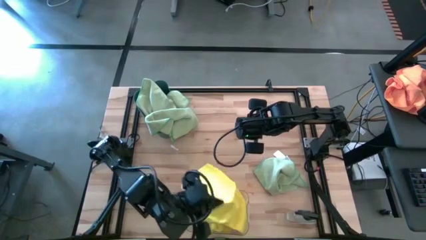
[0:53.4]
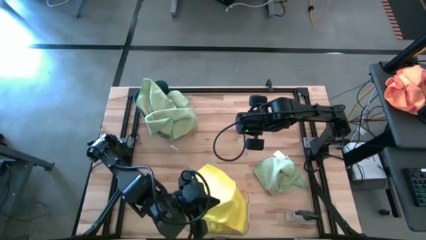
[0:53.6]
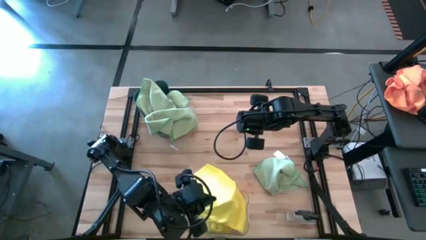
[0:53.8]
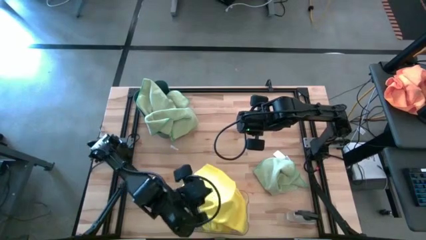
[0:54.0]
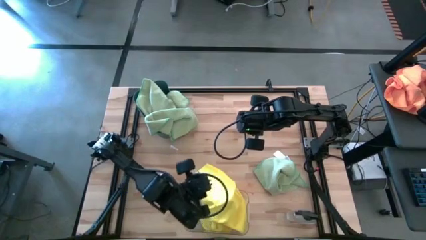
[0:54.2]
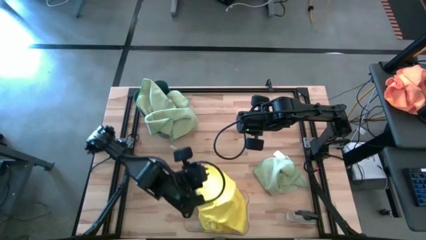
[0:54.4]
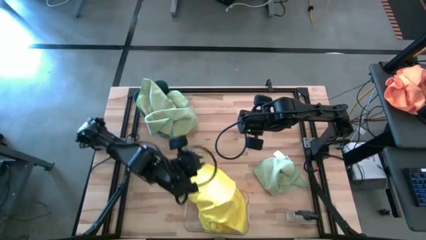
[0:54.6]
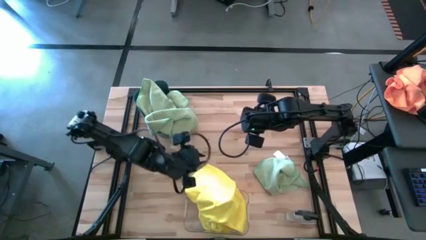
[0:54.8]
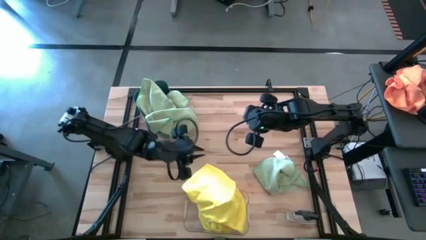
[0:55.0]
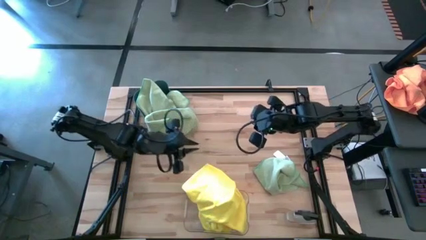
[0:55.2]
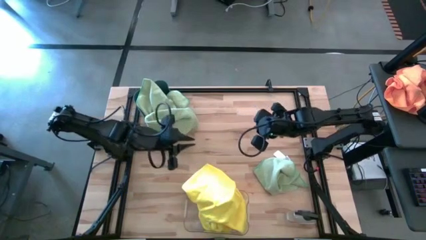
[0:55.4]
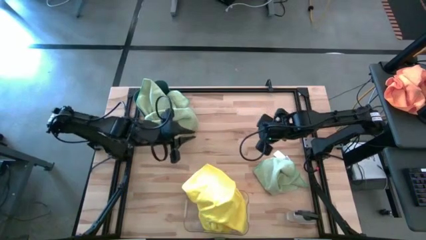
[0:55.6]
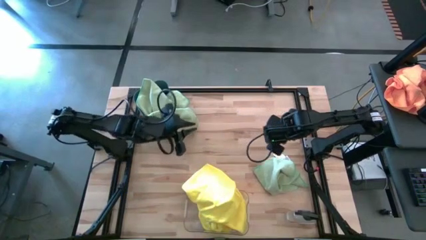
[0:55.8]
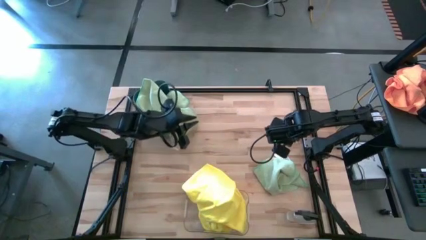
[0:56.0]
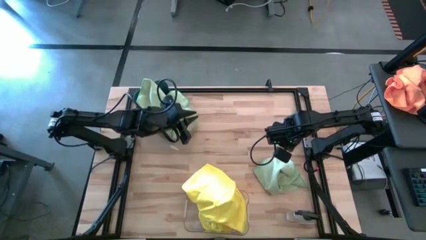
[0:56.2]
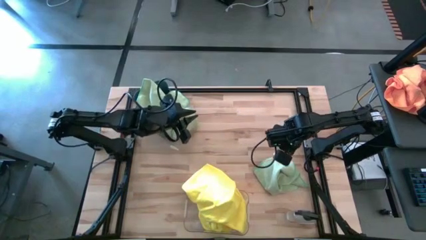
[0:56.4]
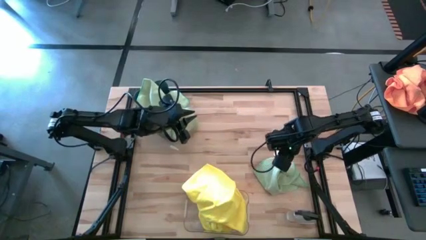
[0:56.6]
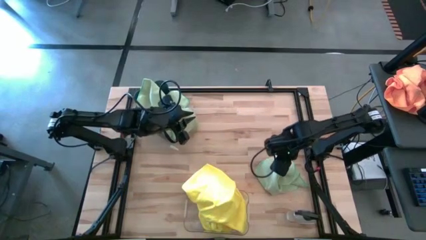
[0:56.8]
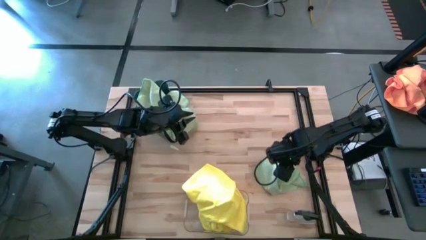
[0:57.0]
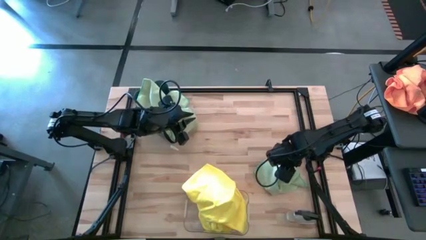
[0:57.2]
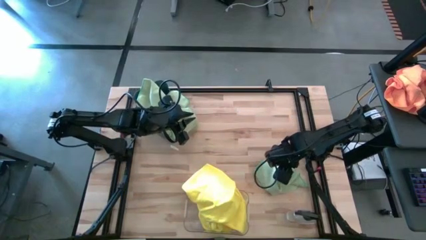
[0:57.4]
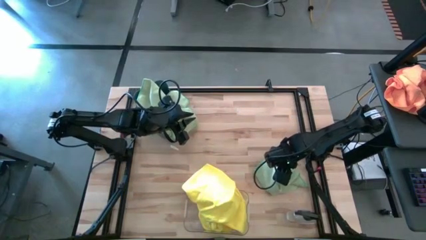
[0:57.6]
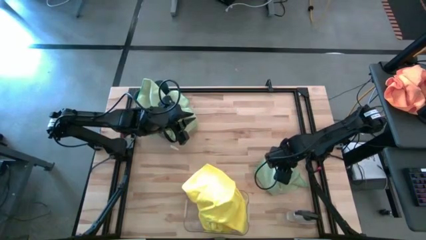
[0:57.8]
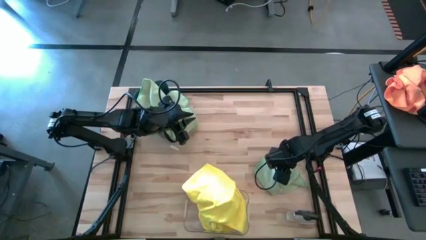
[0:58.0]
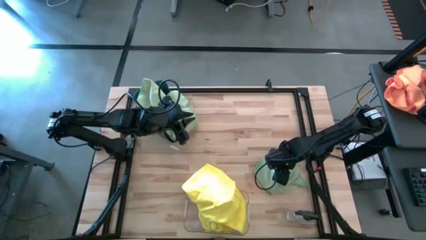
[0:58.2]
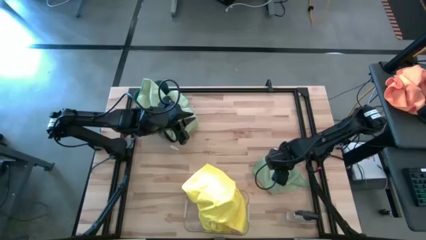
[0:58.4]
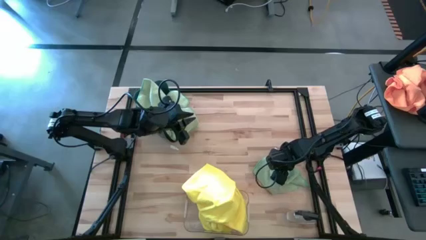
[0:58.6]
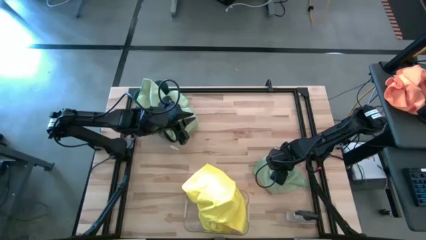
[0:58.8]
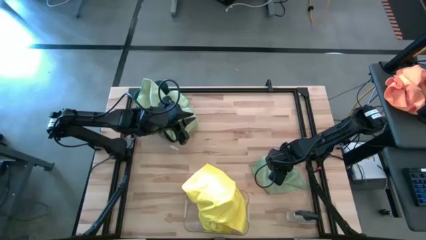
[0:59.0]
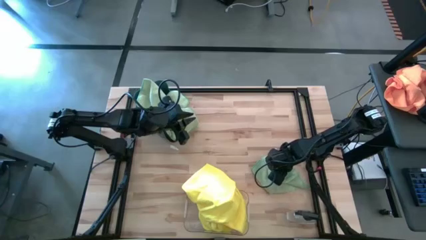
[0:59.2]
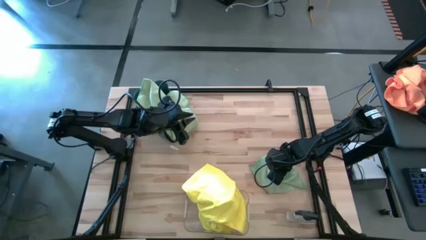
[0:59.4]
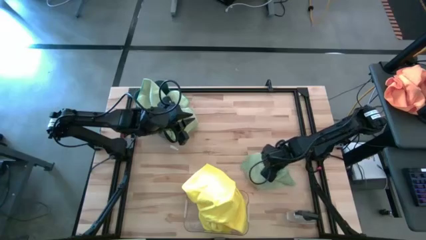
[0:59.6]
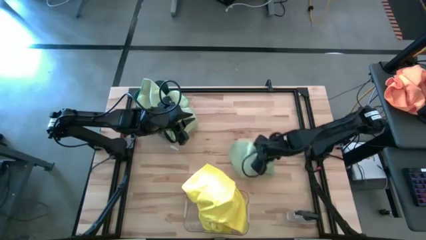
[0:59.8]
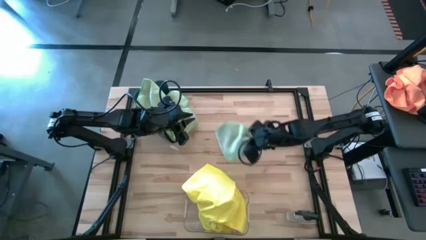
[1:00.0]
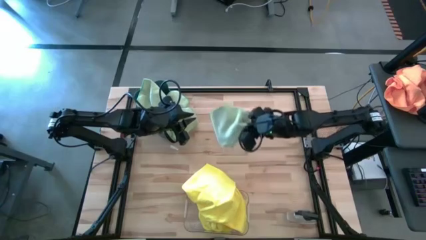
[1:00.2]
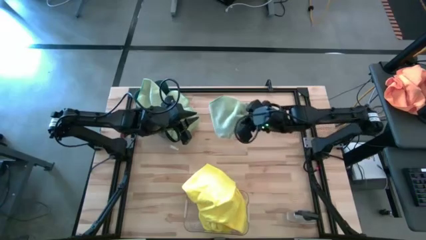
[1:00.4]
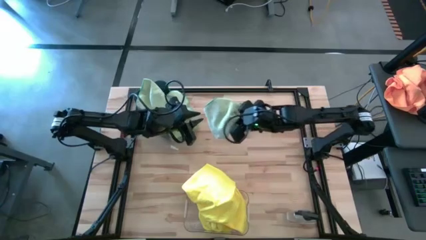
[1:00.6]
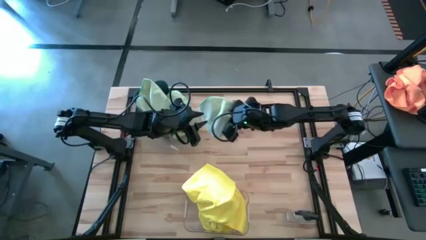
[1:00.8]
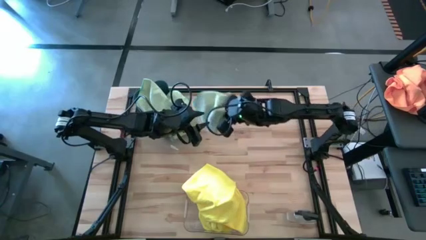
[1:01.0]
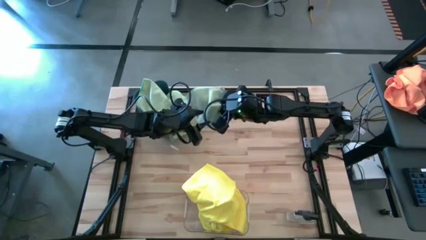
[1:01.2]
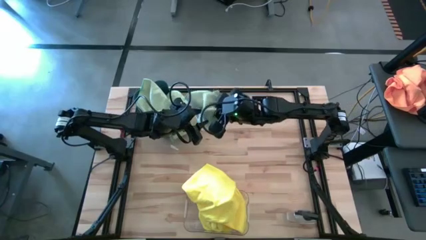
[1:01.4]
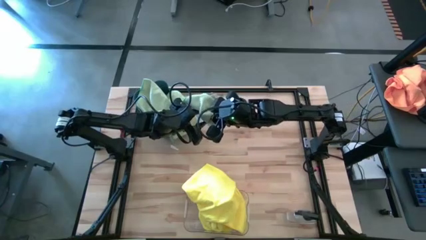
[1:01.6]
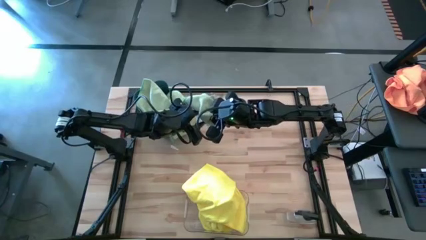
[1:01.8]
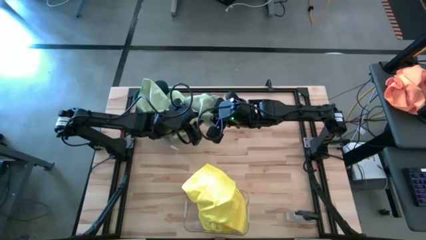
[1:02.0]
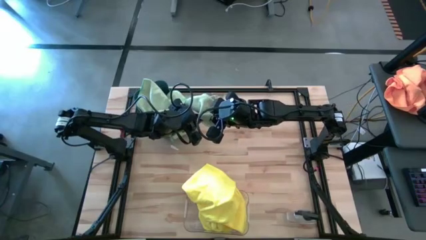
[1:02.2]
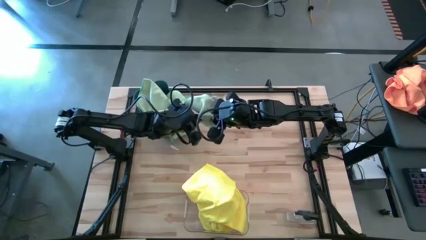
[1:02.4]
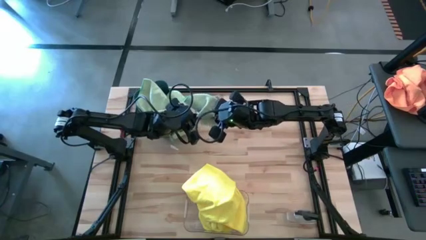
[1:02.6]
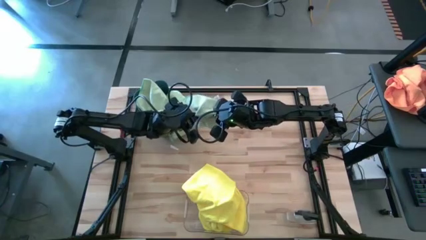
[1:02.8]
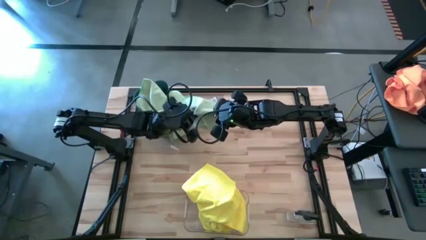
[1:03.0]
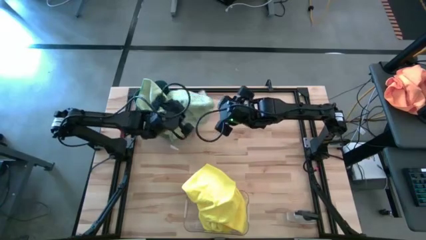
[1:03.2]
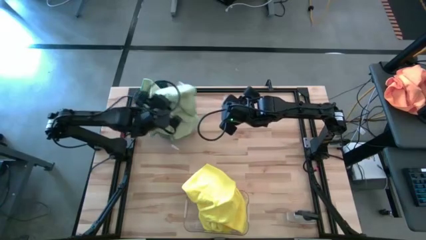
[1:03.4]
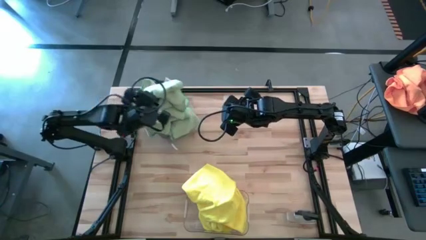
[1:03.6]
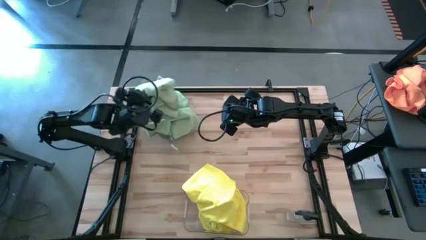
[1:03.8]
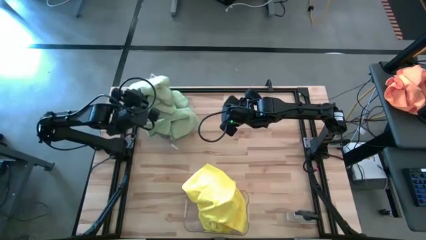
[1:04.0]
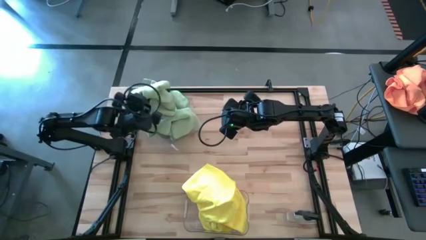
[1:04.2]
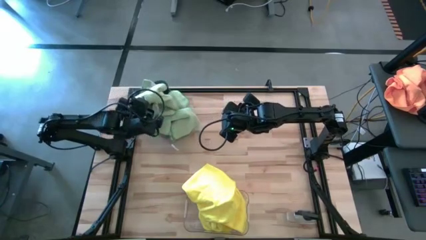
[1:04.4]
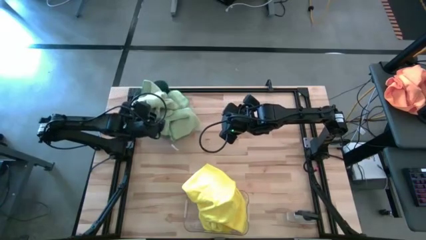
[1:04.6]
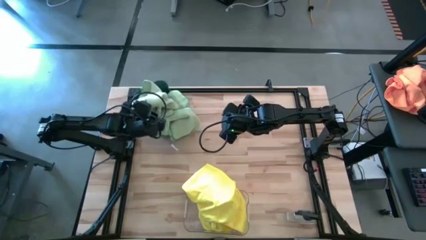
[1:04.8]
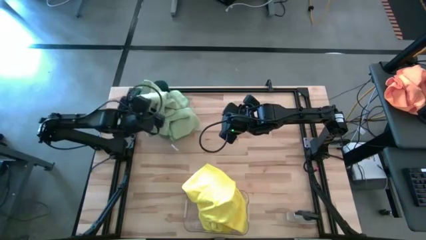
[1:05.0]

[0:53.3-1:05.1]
Task: Sort microfiber towel by color & place in baskets
Put the green towel into the blue bin

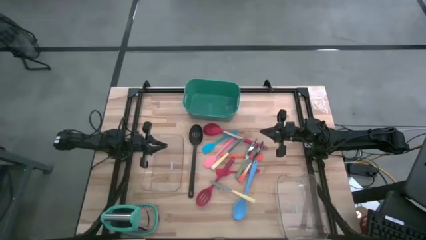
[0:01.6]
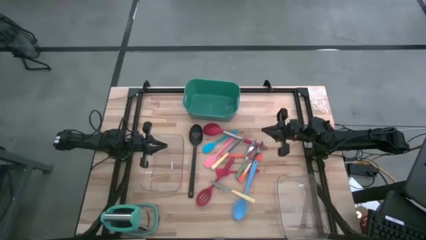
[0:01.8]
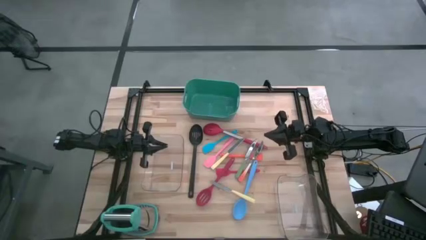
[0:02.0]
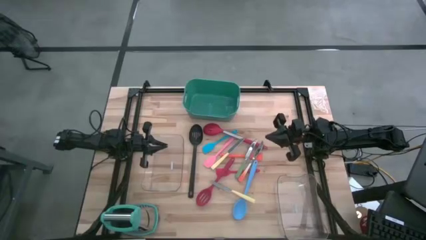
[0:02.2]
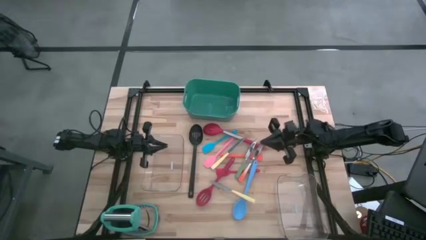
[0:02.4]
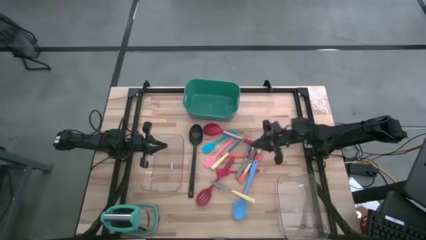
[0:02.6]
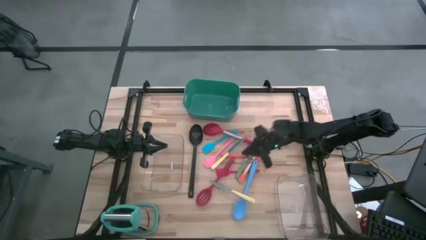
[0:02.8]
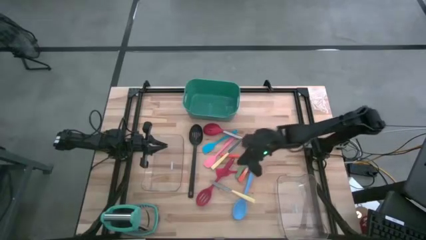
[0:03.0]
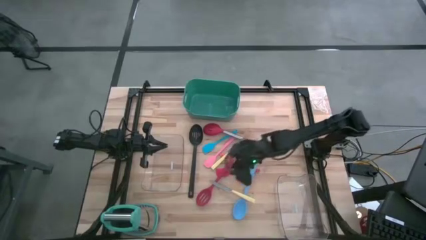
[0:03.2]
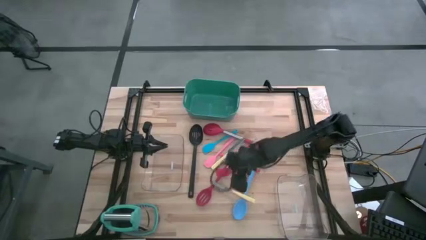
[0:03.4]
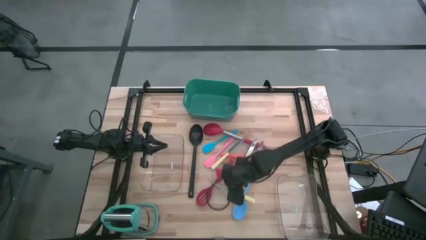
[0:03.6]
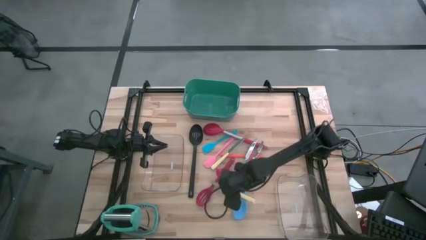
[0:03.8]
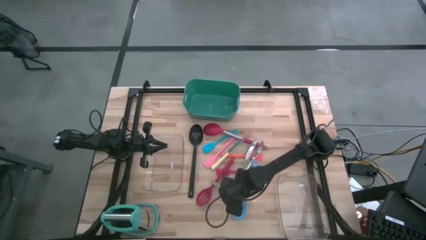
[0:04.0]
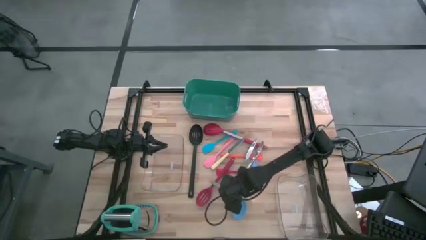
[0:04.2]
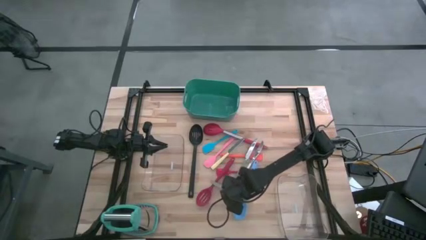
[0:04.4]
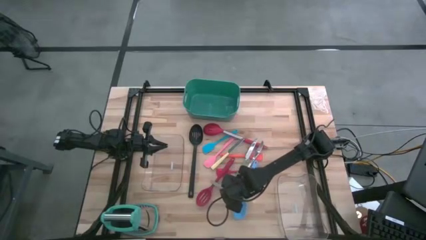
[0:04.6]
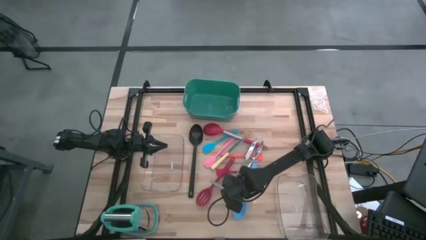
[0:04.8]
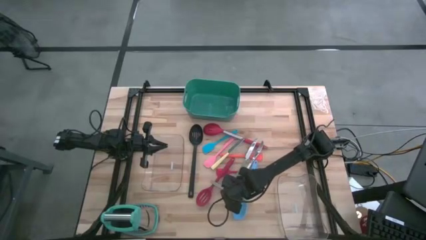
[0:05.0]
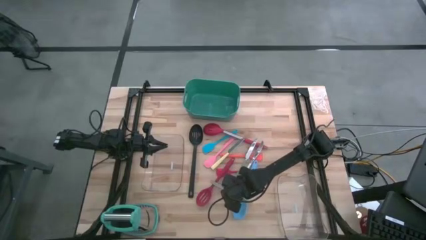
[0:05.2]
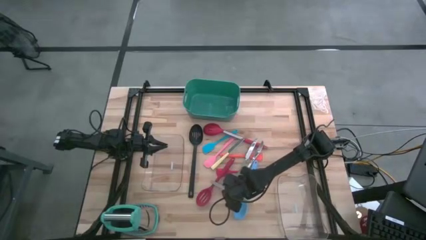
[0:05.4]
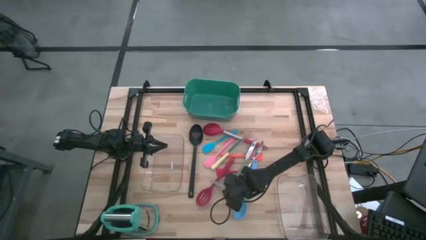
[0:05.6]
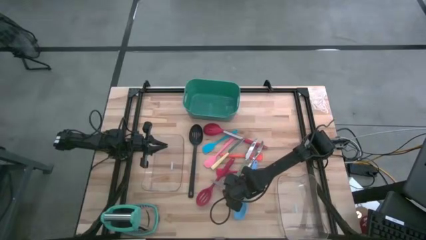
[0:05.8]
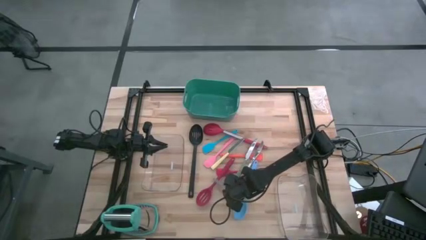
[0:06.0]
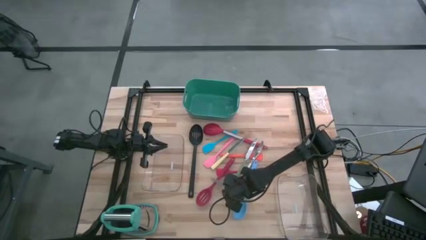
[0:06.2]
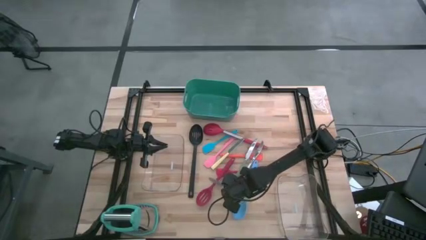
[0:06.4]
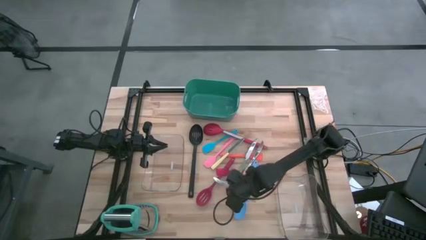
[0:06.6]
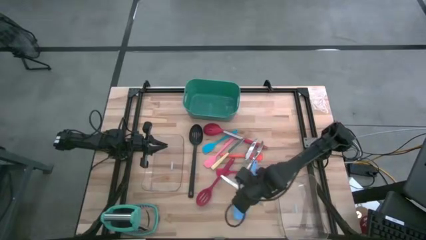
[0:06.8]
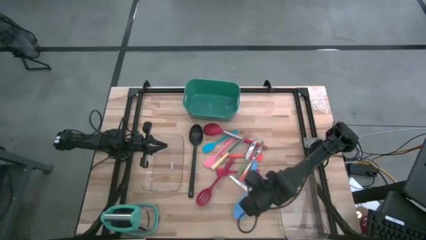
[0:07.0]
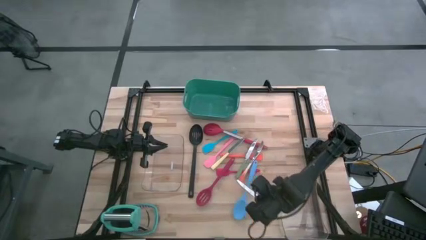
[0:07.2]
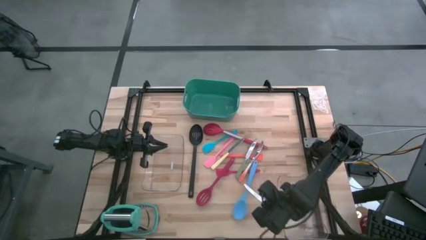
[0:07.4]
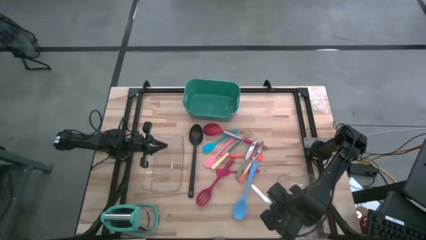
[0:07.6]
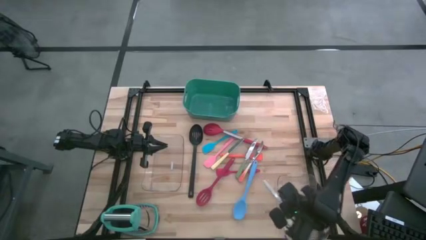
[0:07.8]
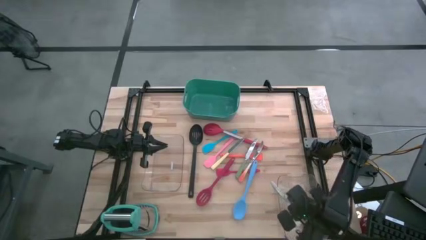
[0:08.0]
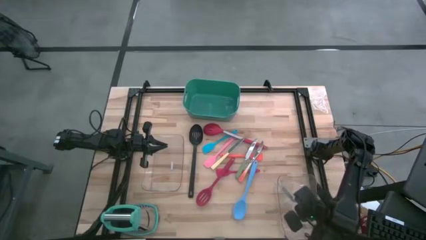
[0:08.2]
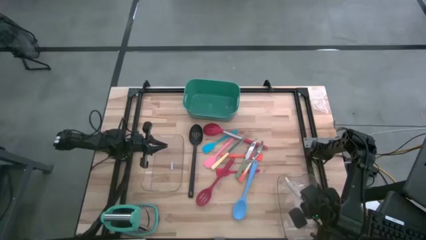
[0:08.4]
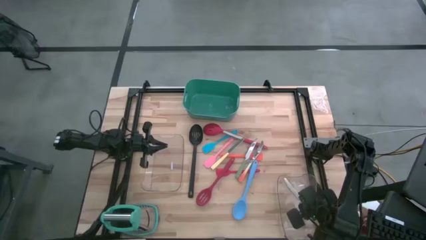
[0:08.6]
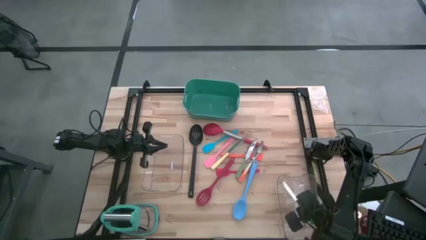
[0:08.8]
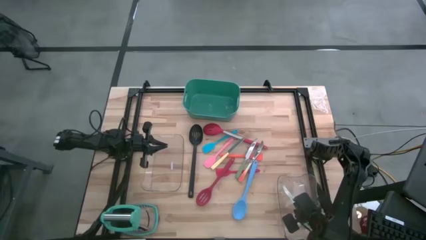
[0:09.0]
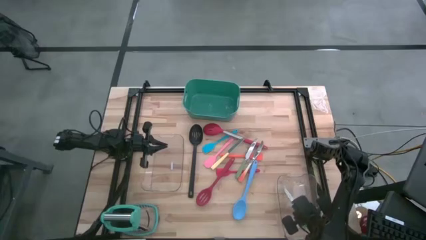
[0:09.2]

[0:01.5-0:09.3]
Task: Pick & Place Kitchen Items
Put the bottom yellow knife into the right transparent bin
